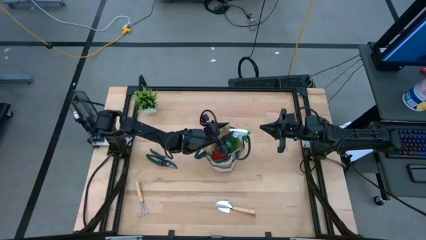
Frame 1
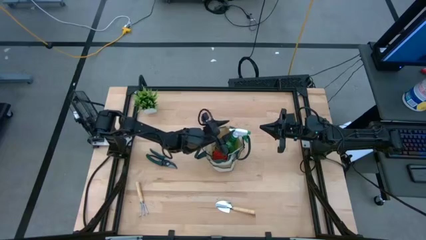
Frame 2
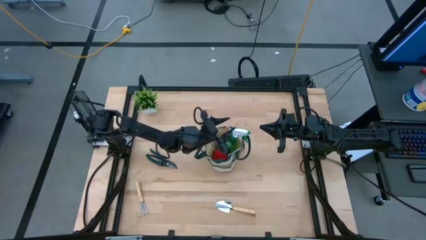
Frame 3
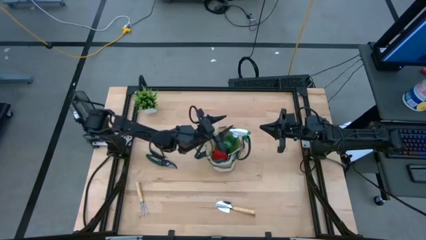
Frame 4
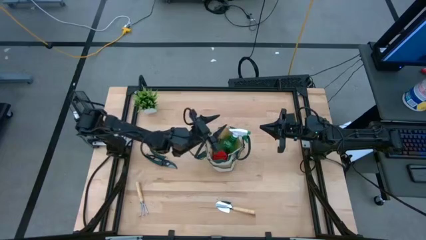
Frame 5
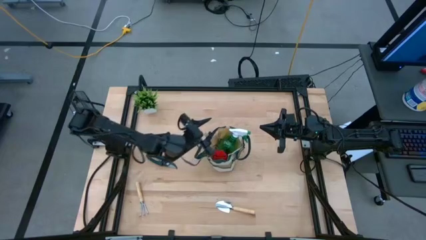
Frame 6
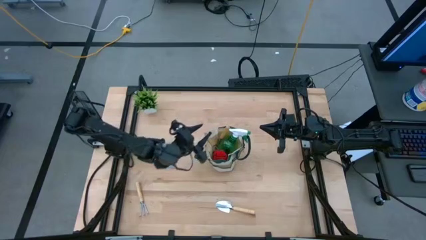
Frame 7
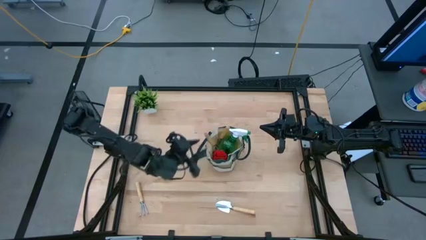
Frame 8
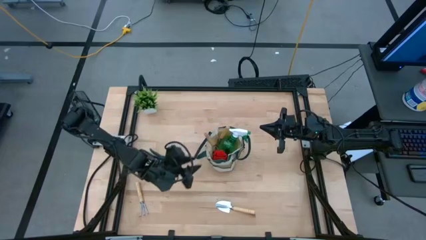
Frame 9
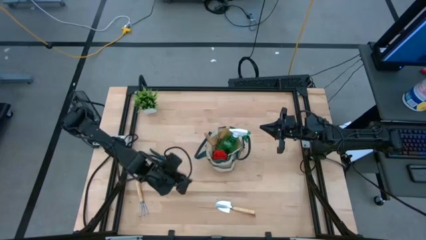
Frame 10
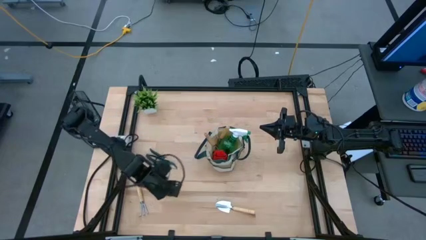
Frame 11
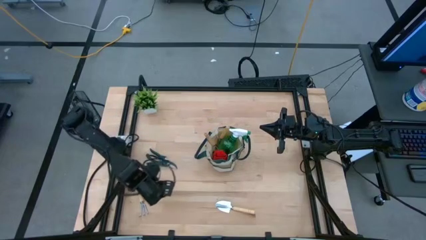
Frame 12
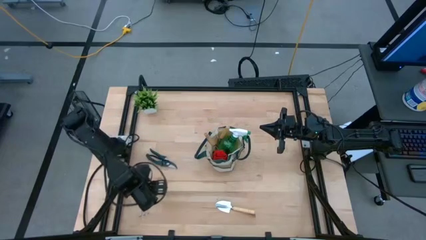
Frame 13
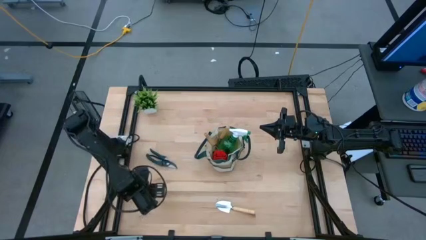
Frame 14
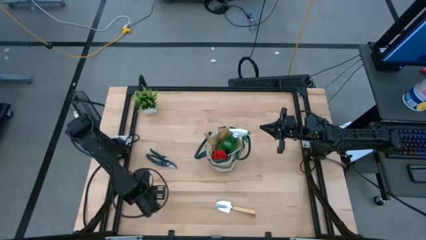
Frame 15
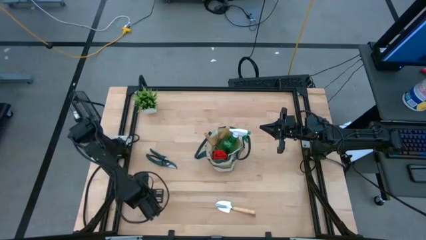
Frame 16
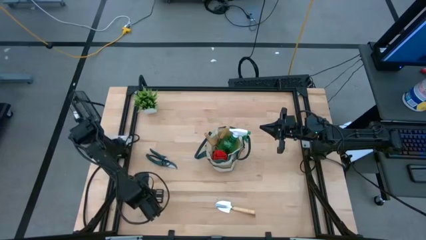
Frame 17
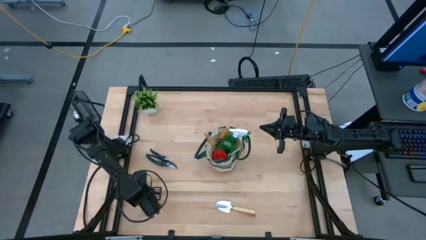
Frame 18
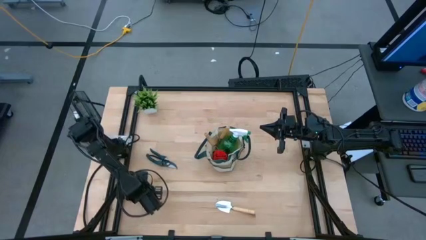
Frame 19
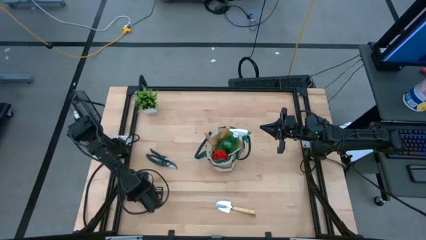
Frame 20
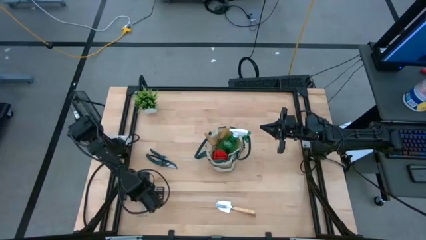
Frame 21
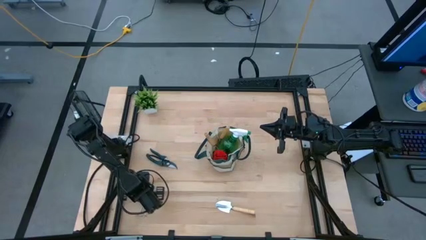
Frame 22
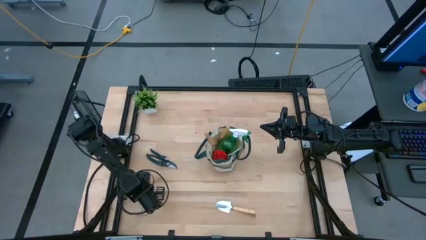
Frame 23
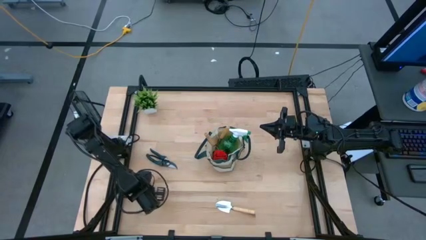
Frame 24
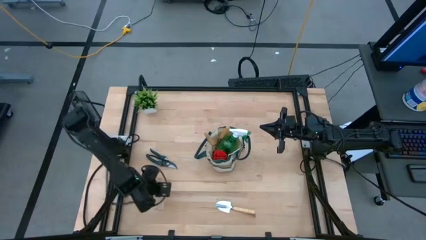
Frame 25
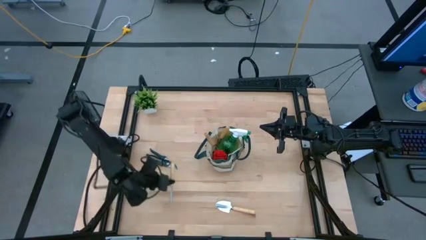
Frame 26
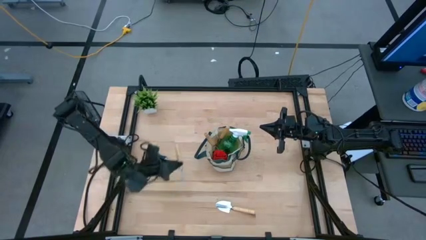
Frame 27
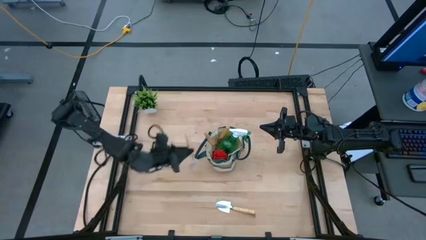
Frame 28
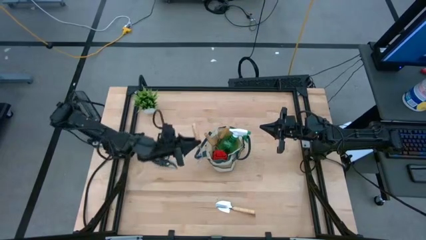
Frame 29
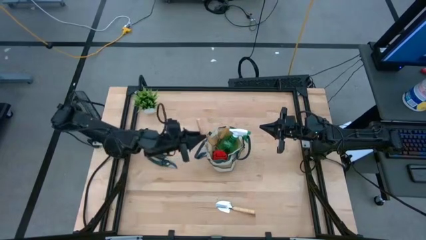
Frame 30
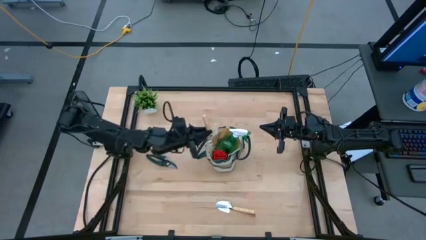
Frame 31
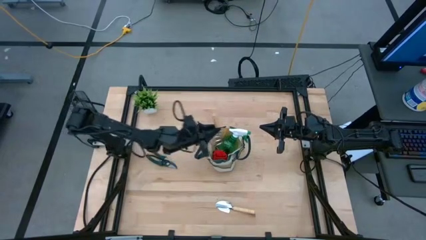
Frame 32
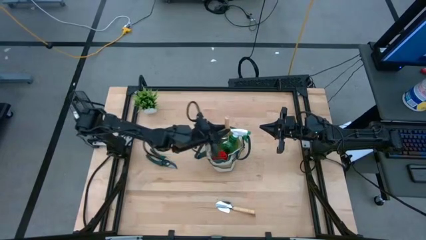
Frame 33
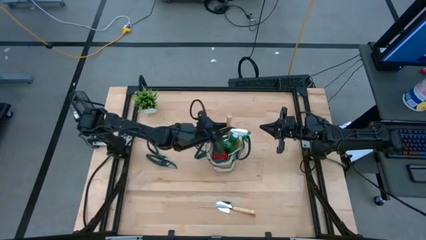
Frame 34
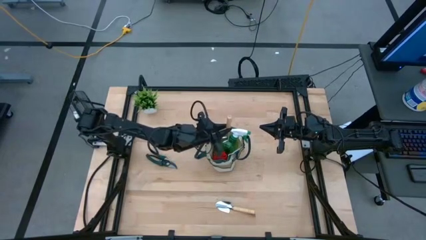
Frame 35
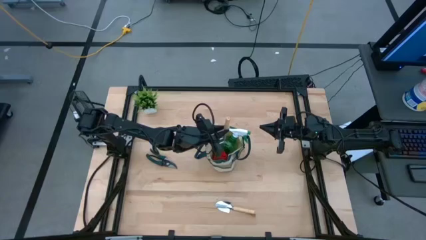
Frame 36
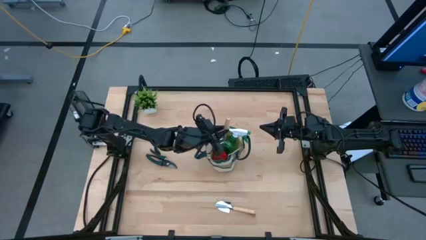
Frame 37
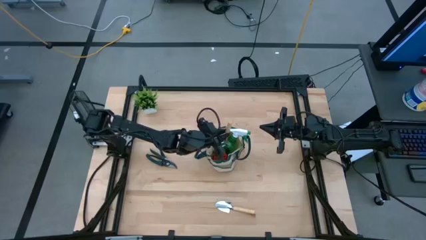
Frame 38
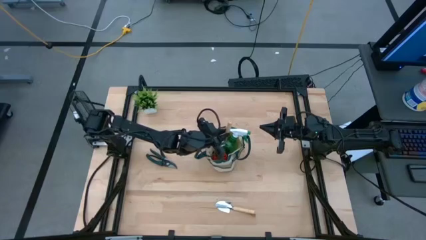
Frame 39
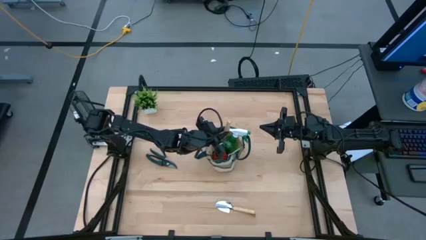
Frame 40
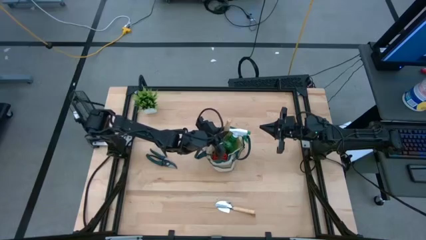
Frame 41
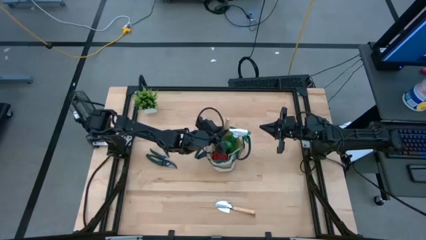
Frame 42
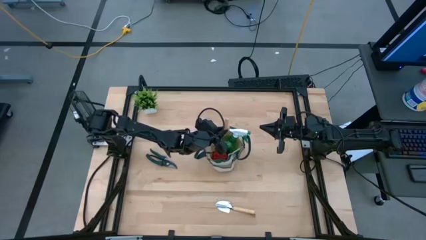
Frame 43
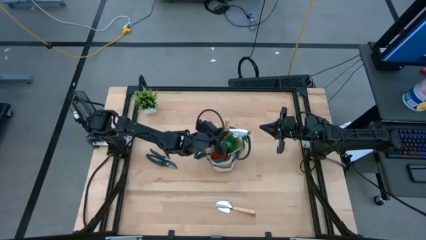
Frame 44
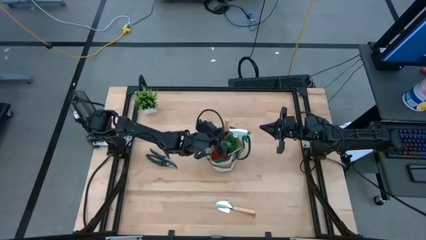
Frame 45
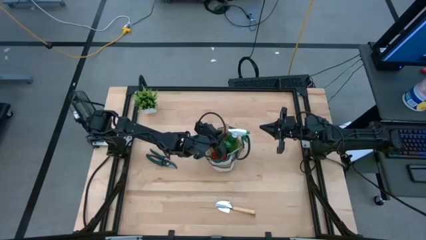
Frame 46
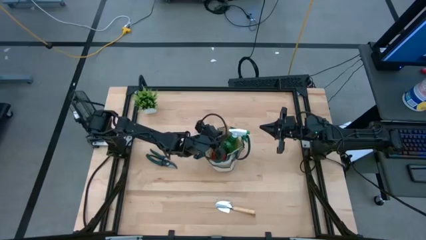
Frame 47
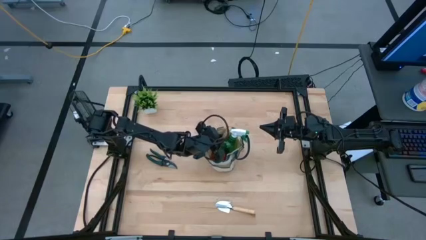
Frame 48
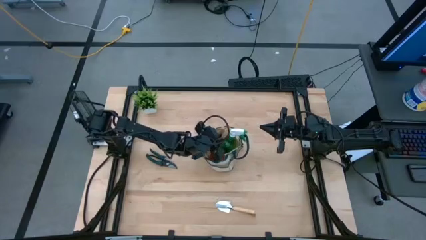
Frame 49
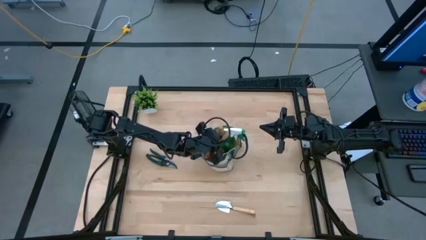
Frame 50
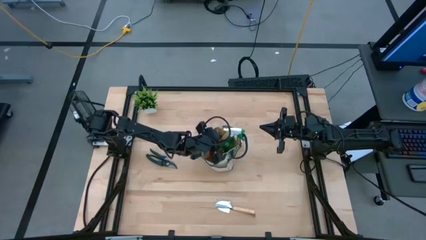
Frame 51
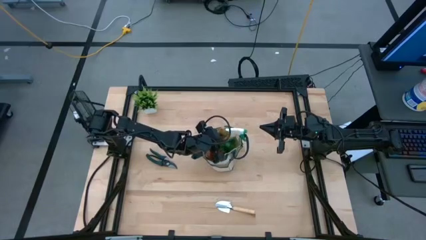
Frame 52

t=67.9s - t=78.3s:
Task: Pick & Place Garden tools in Gardening bag
Put the light brown hand rake into the light brown gardening bag
